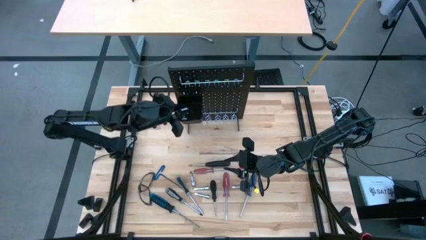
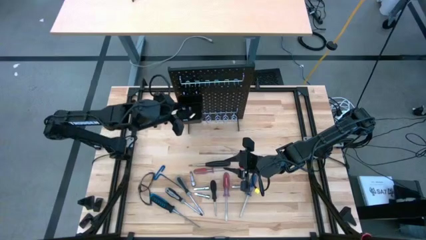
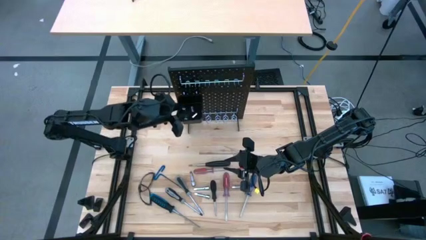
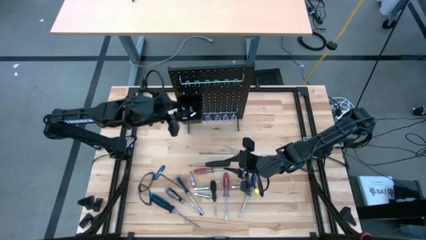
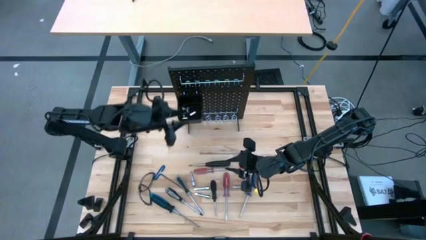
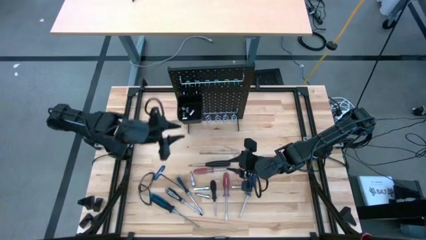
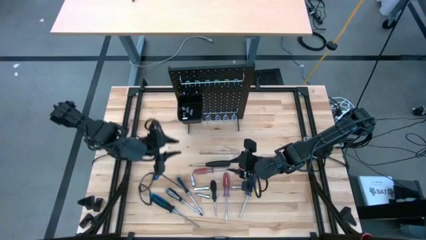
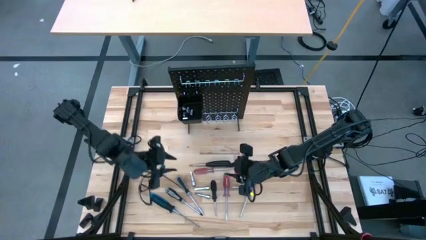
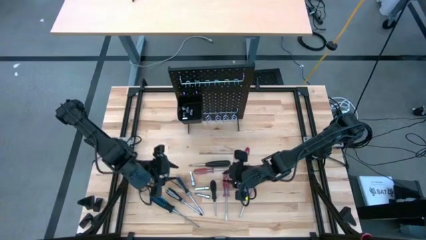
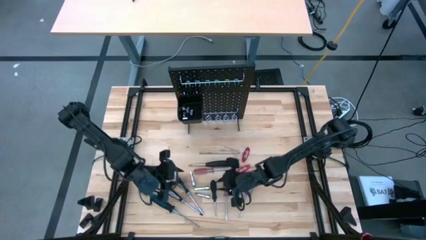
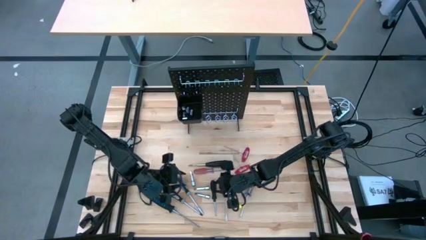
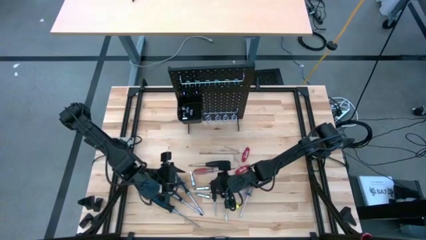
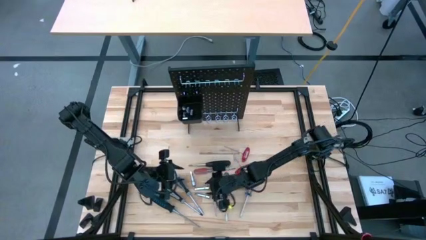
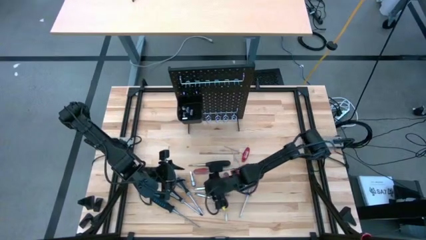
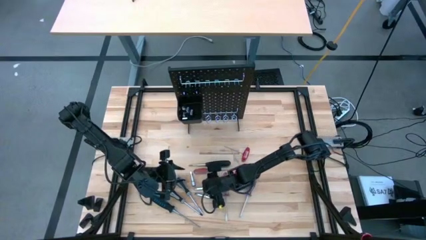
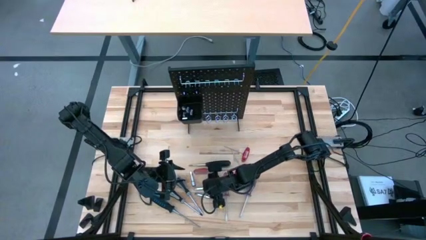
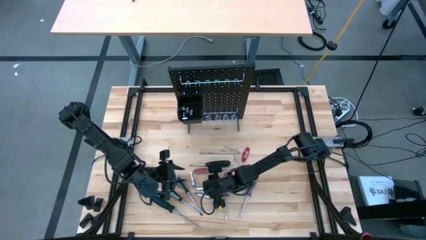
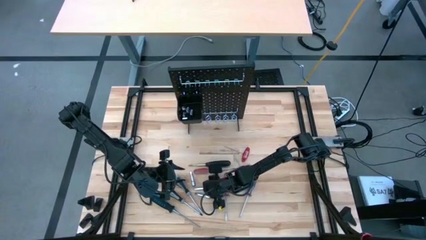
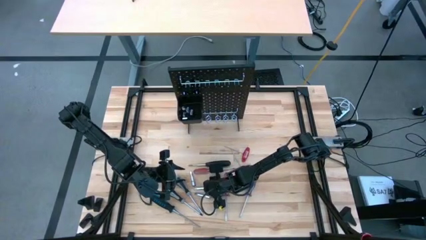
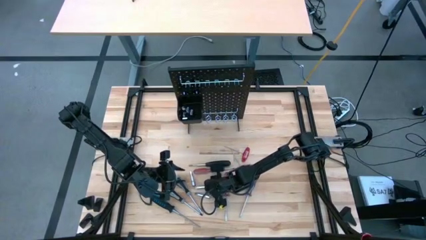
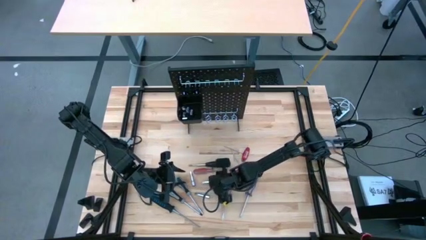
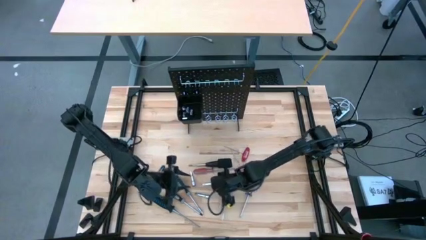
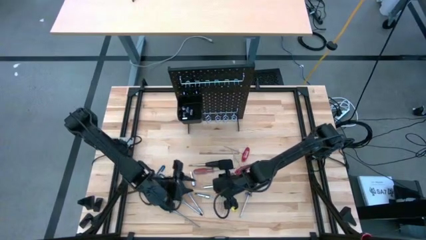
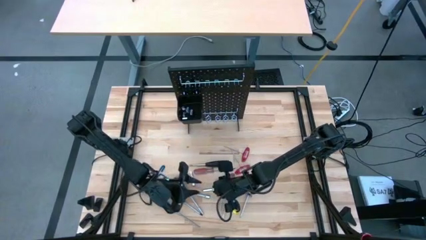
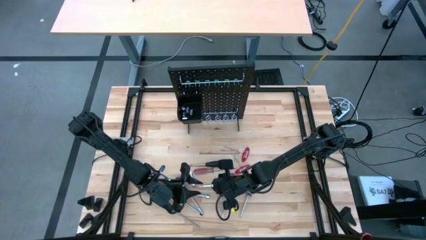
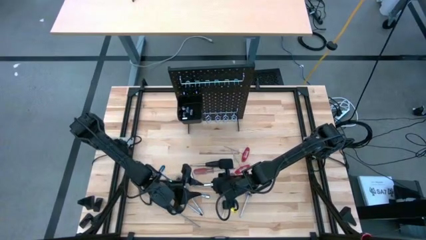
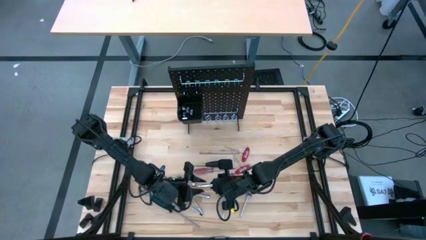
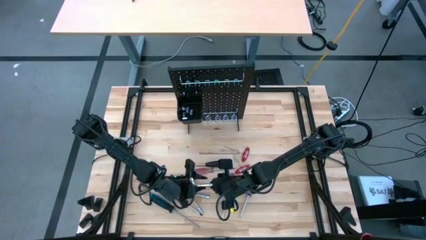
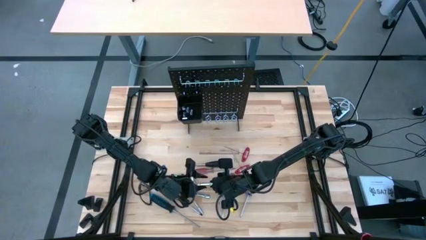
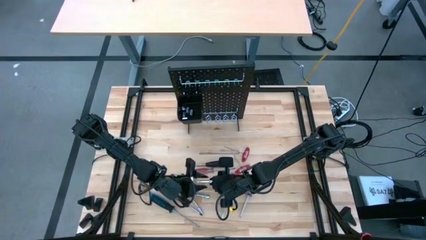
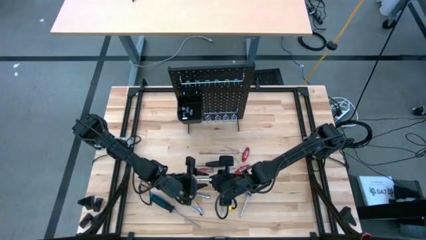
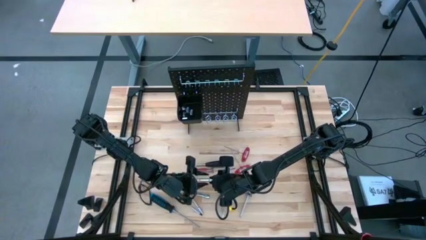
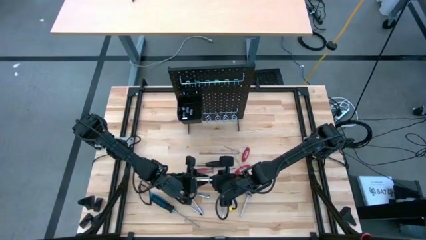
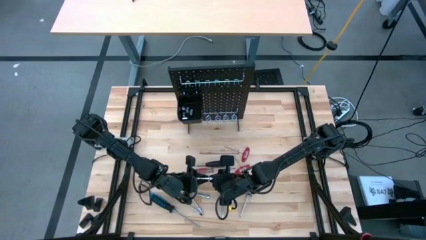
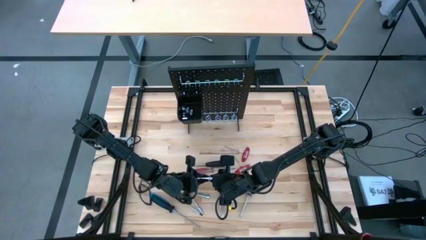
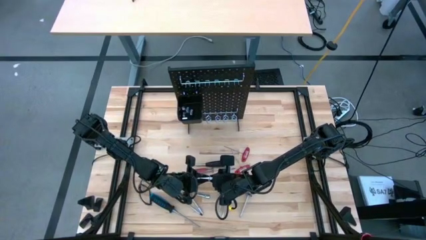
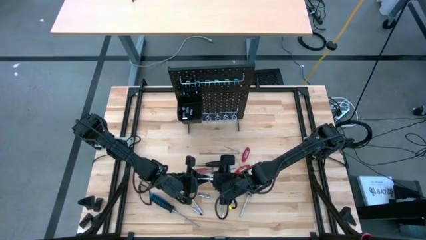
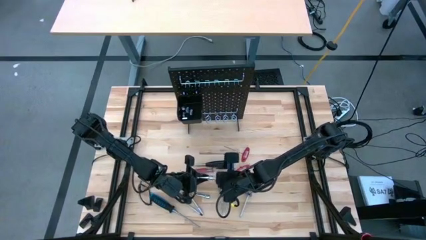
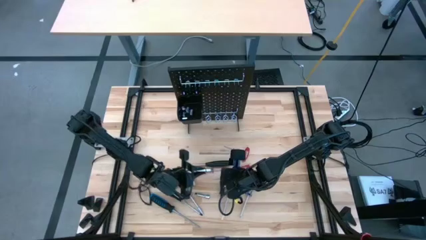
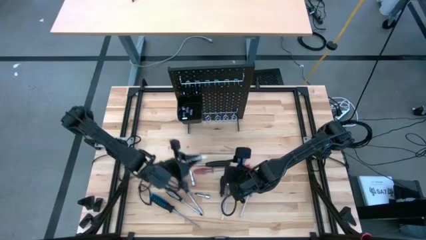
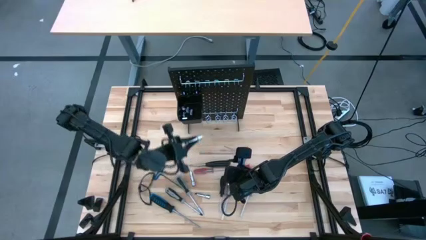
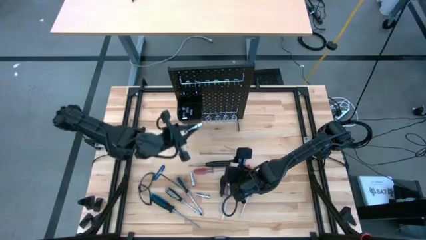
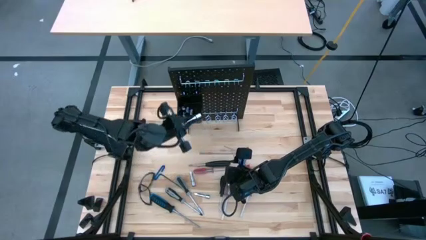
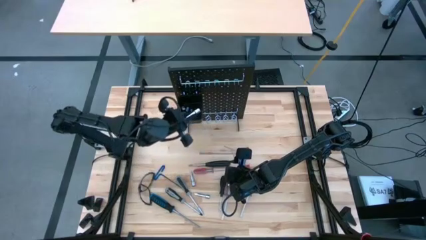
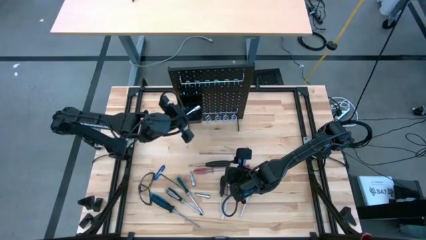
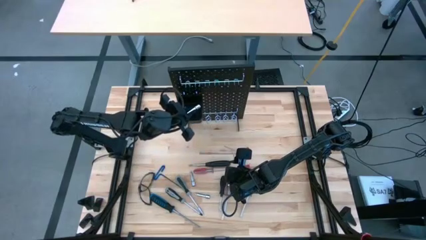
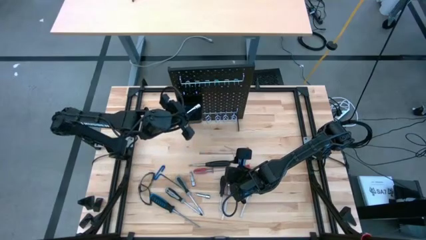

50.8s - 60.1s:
Task: Hang tools onto peg board
Put the extension bar into the black bin on the pegboard

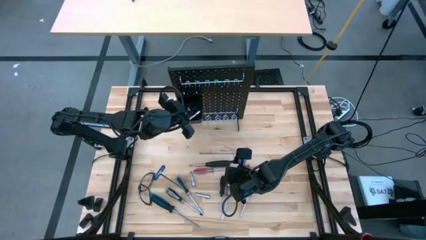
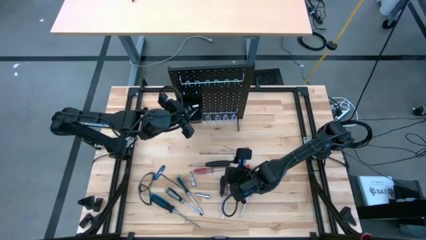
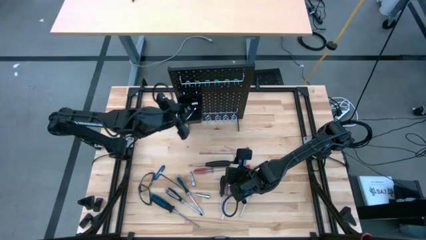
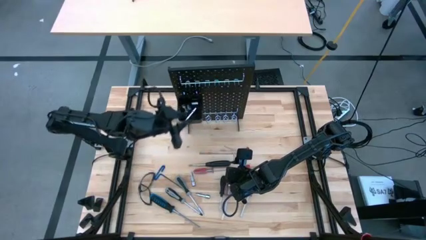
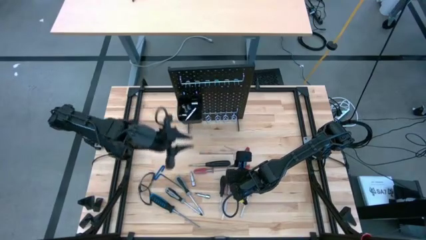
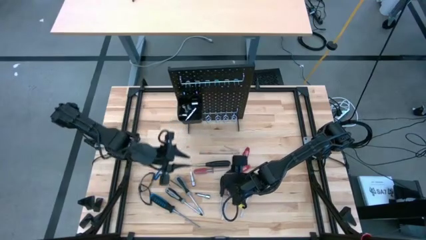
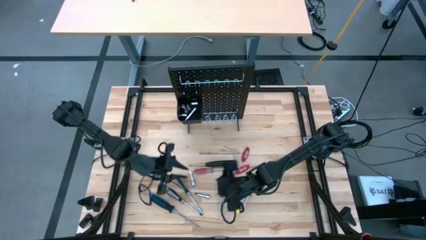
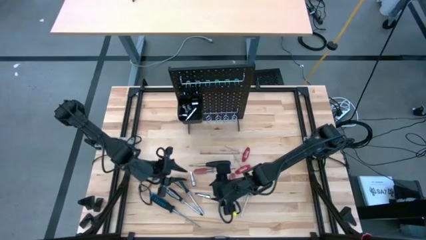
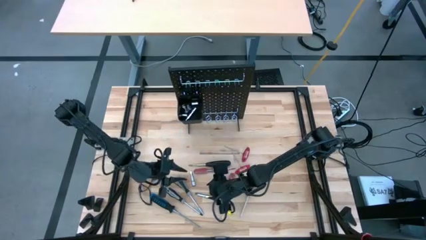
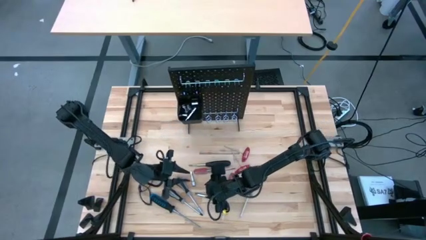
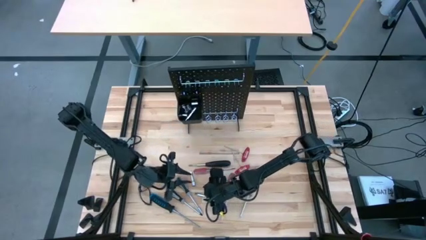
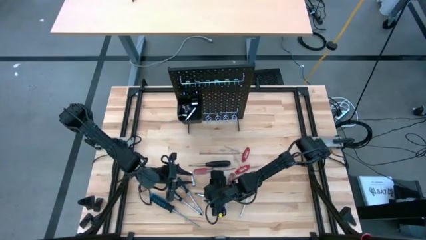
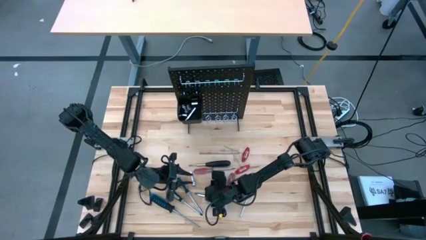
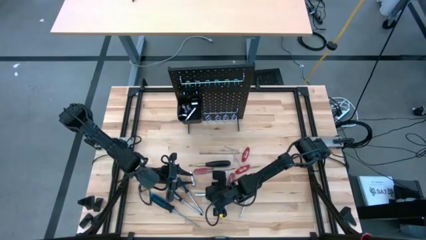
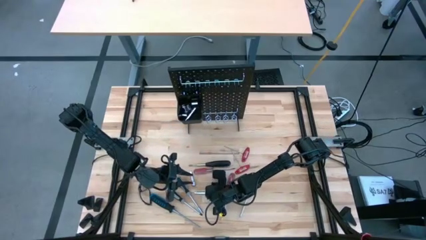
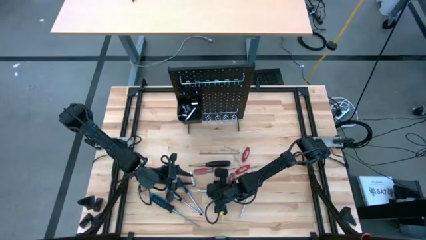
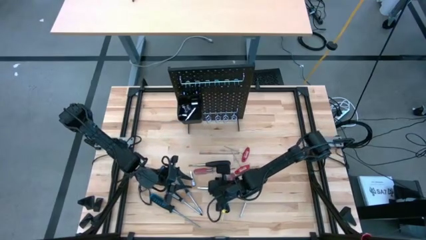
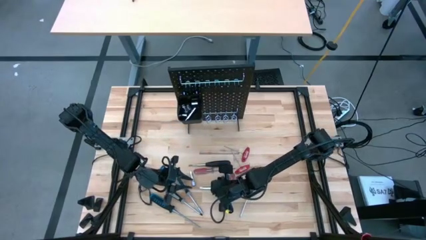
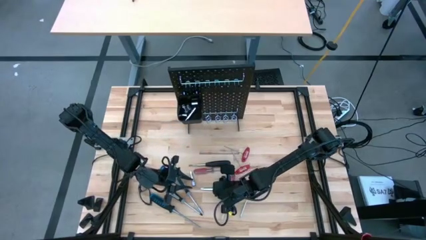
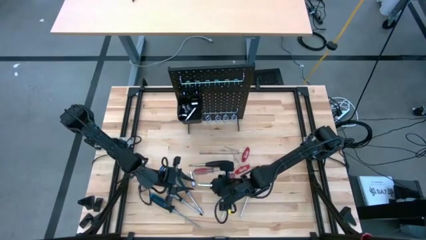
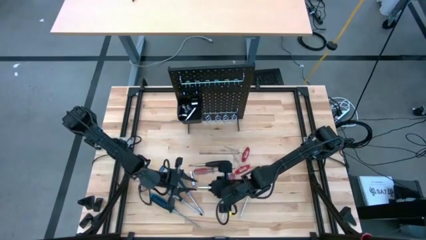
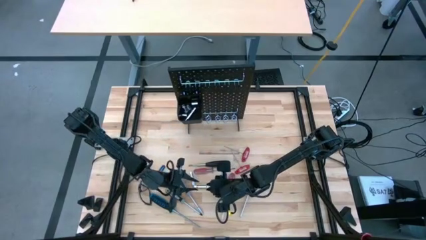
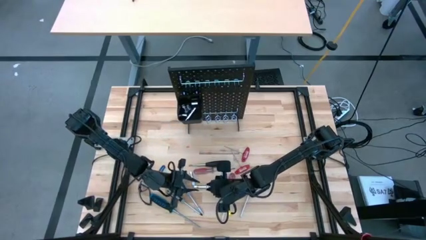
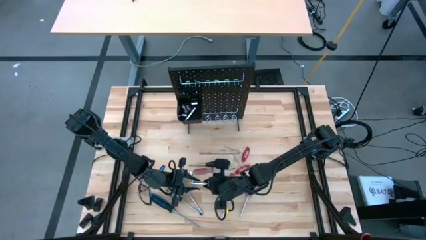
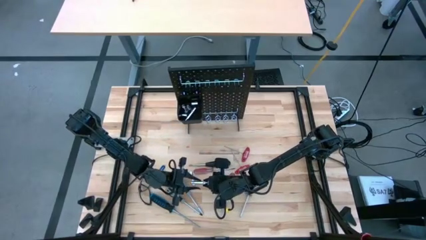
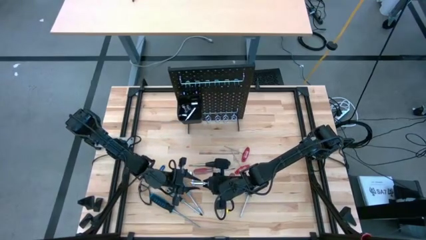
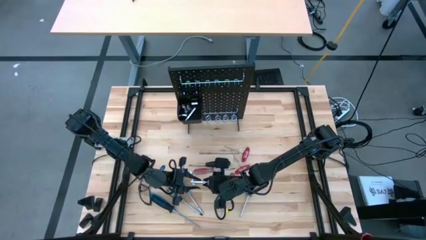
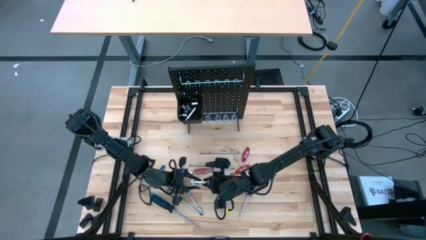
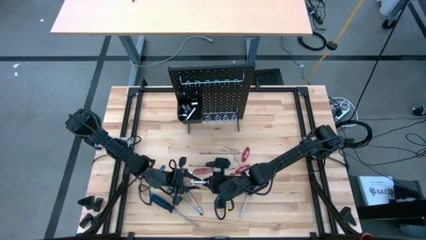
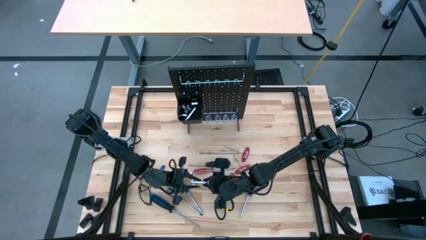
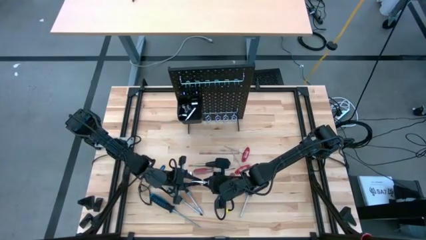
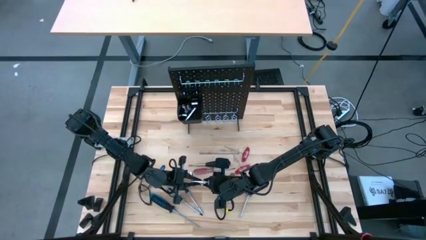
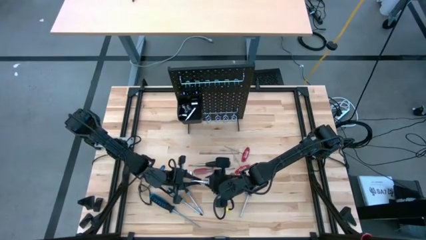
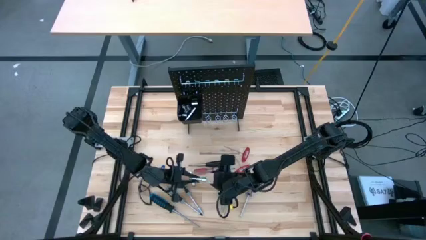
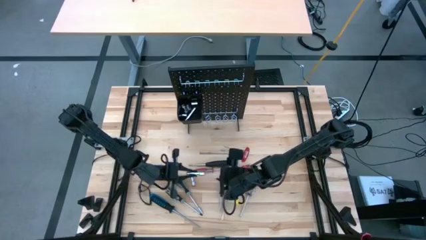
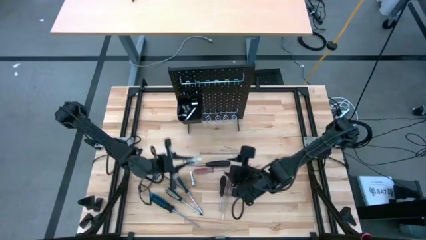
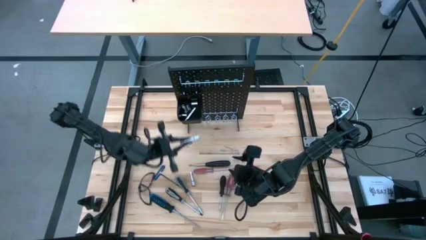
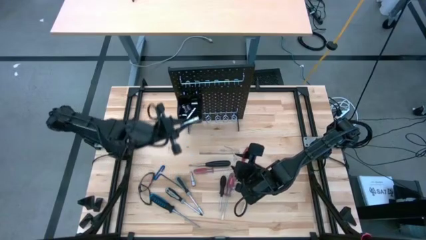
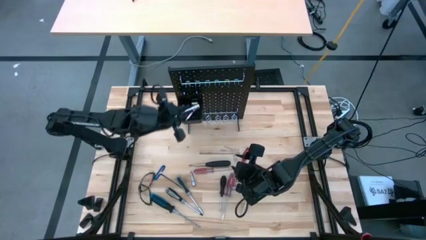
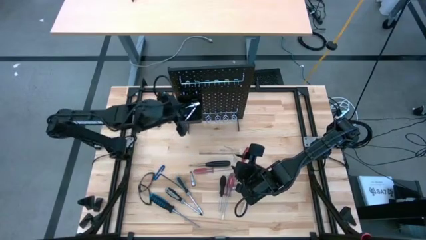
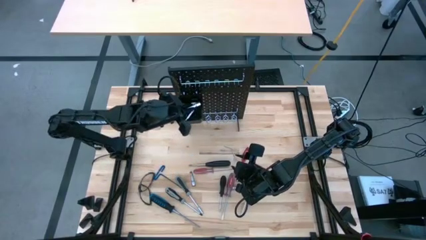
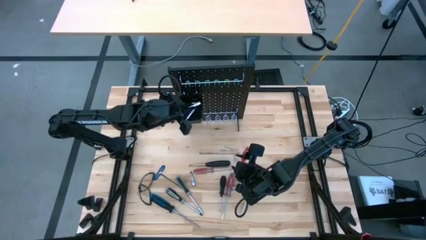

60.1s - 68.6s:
Put the extension bar into the black bin on the pegboard
